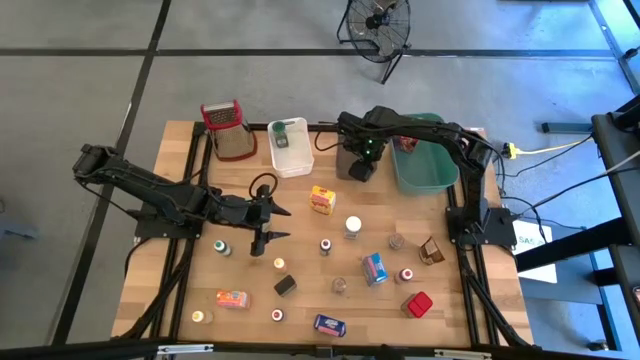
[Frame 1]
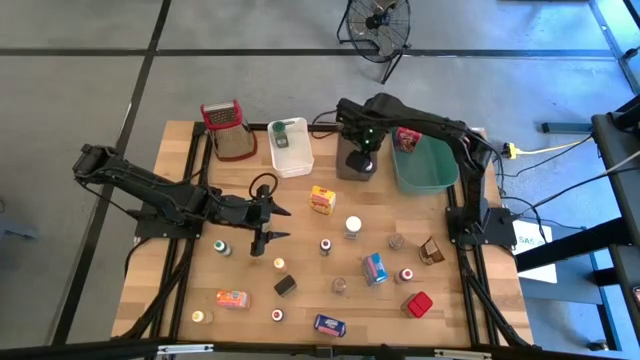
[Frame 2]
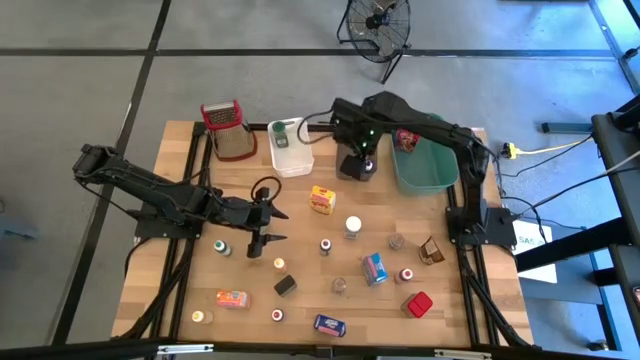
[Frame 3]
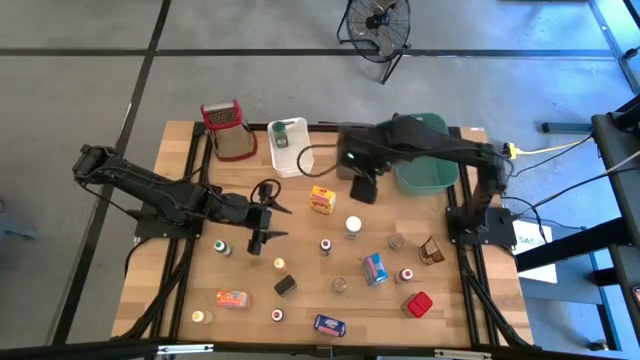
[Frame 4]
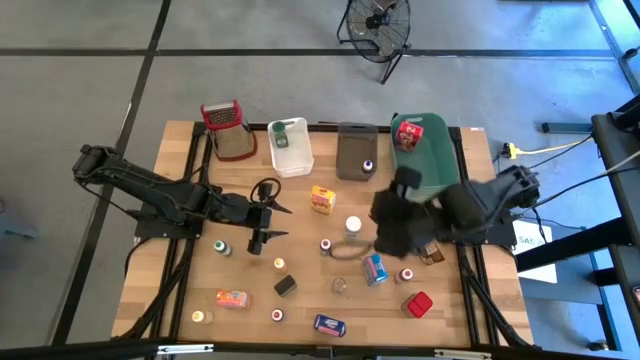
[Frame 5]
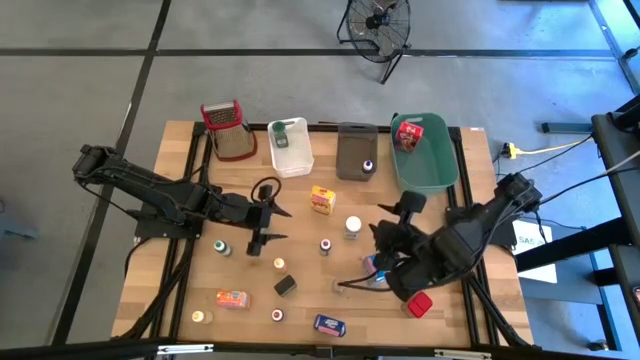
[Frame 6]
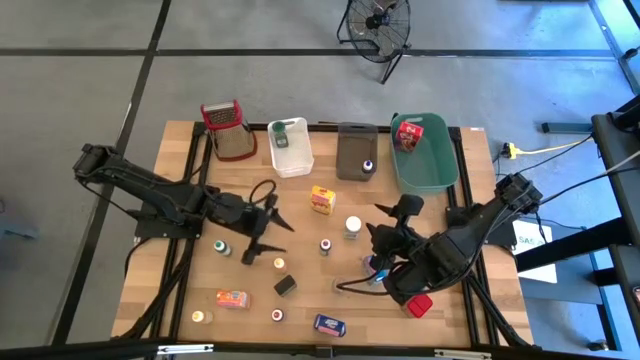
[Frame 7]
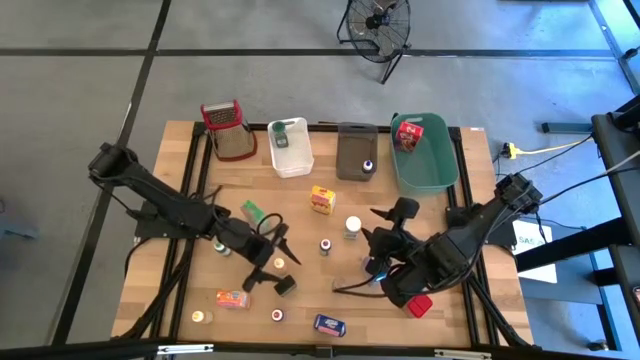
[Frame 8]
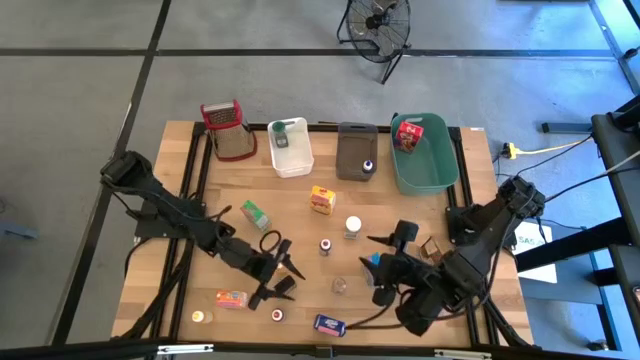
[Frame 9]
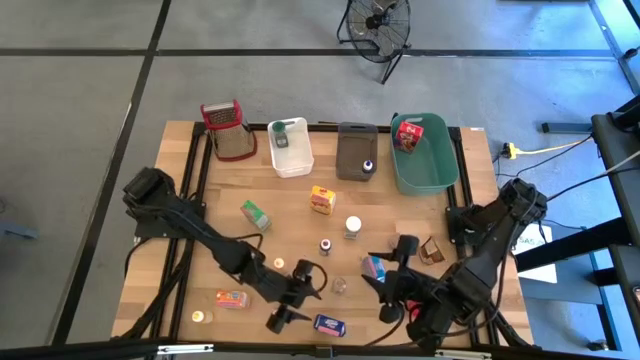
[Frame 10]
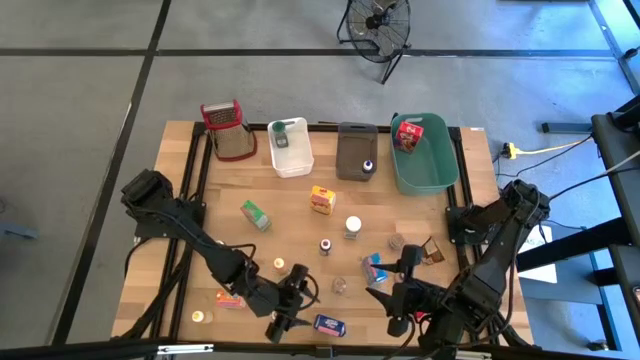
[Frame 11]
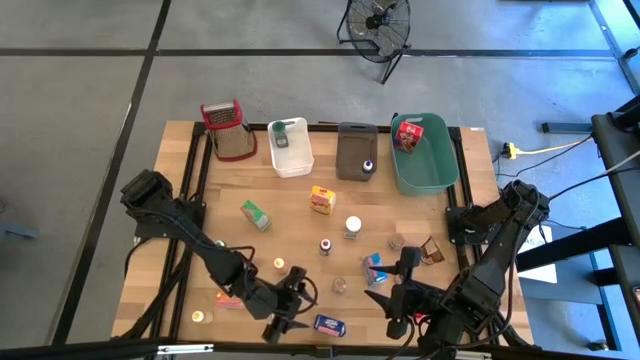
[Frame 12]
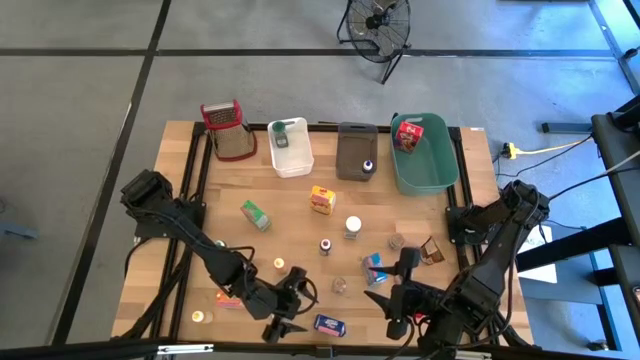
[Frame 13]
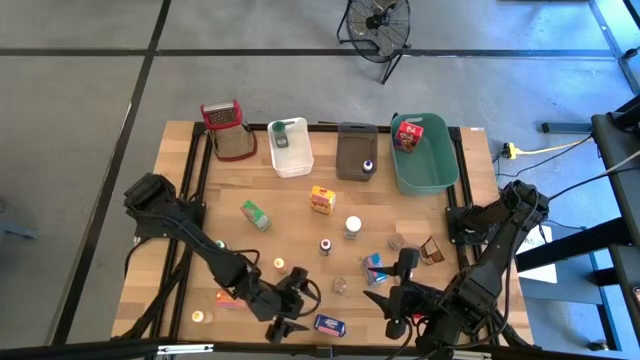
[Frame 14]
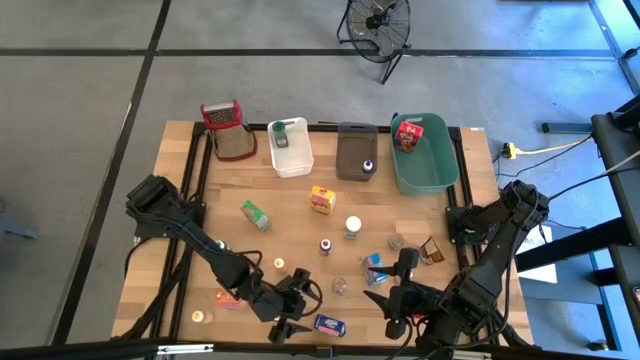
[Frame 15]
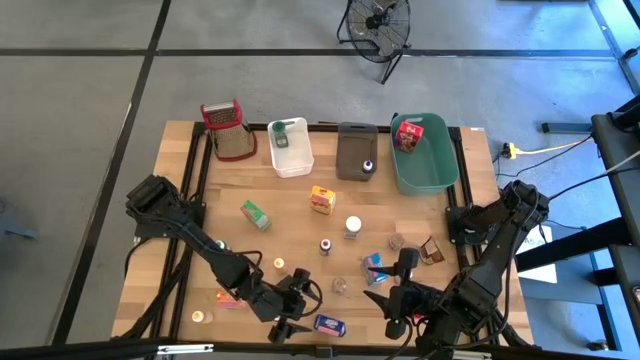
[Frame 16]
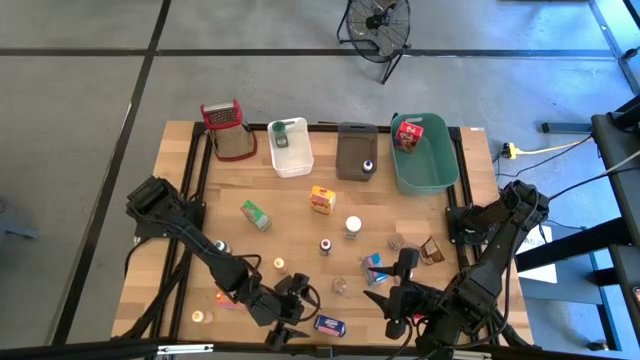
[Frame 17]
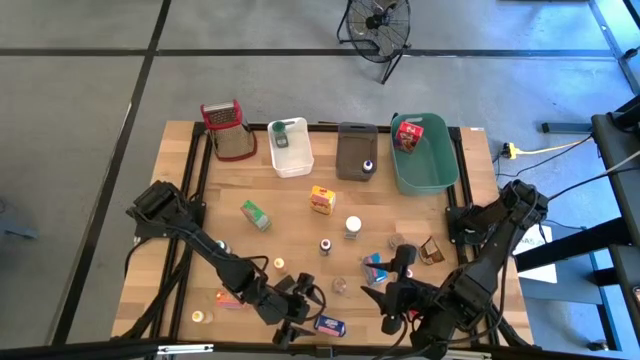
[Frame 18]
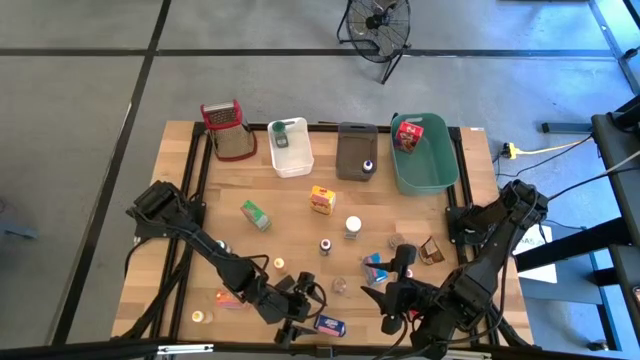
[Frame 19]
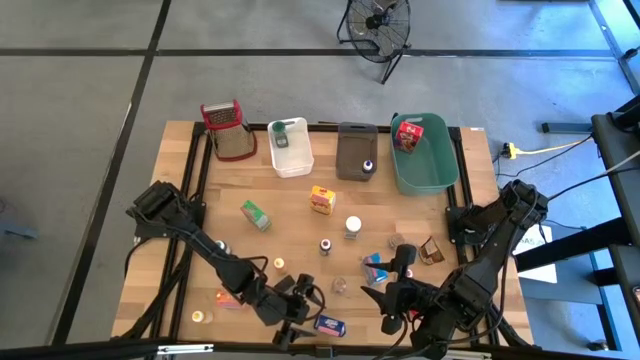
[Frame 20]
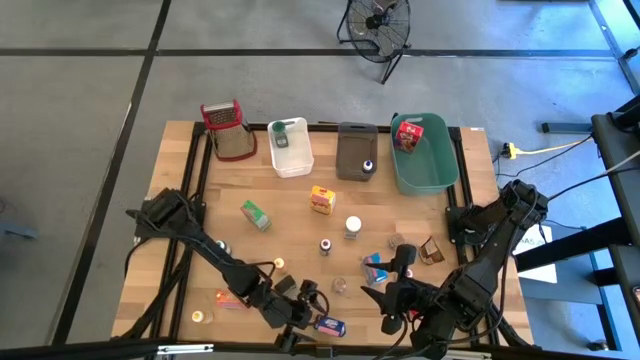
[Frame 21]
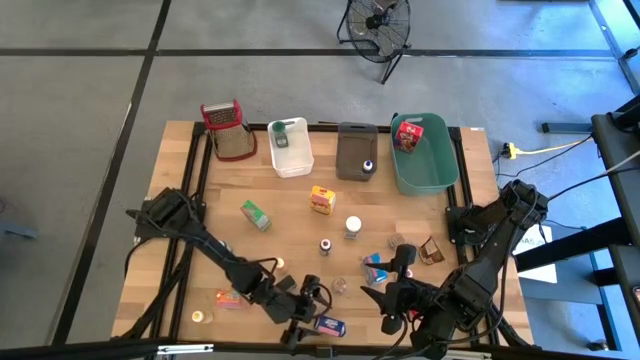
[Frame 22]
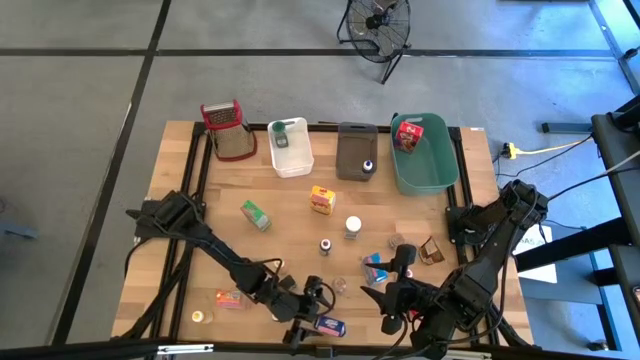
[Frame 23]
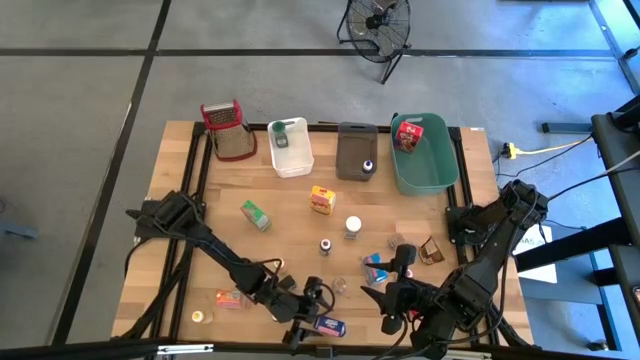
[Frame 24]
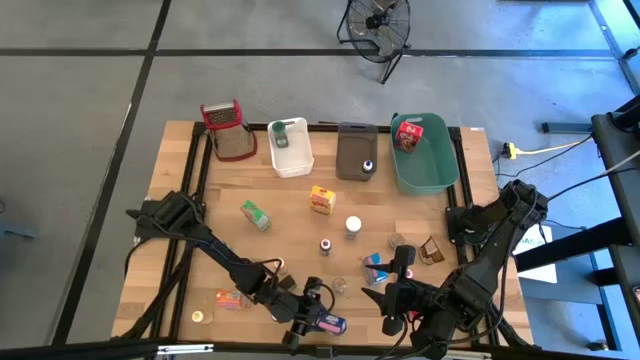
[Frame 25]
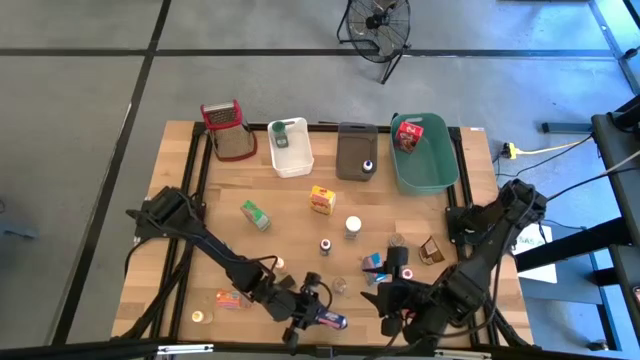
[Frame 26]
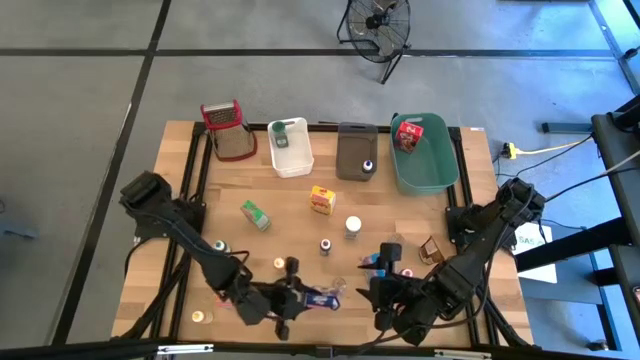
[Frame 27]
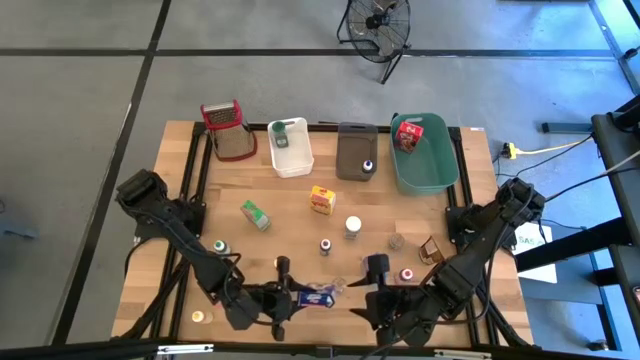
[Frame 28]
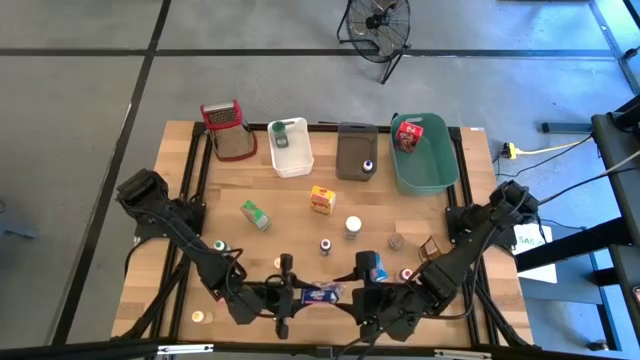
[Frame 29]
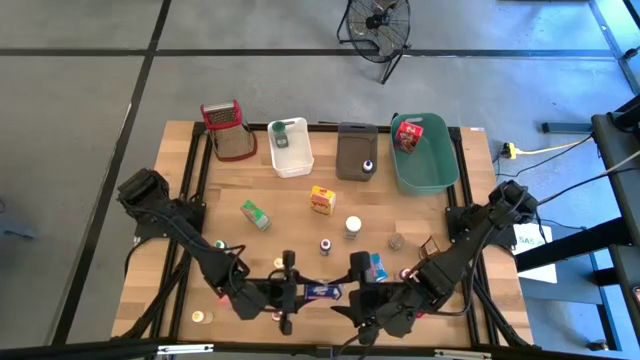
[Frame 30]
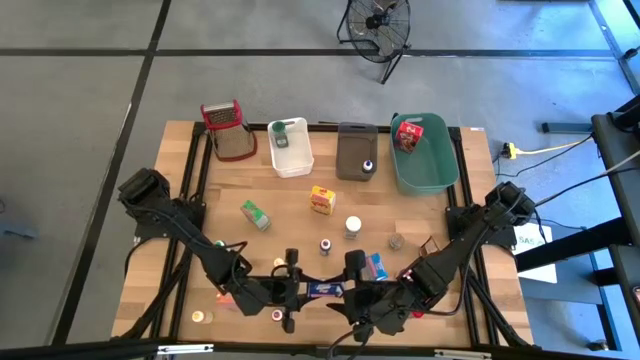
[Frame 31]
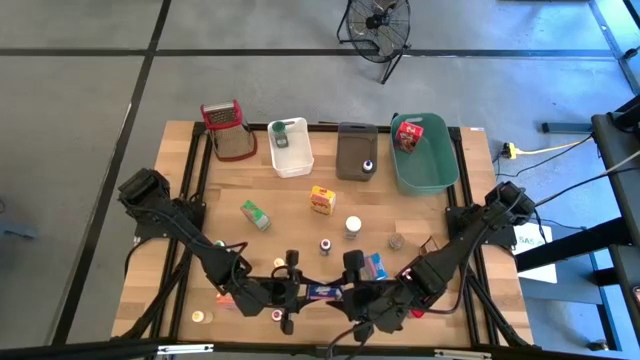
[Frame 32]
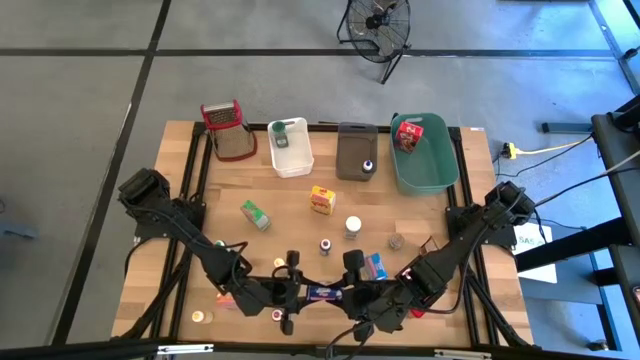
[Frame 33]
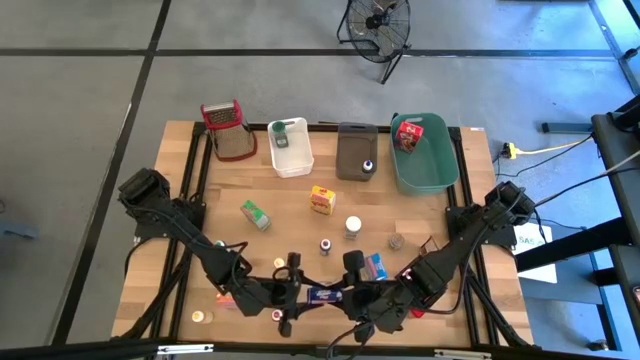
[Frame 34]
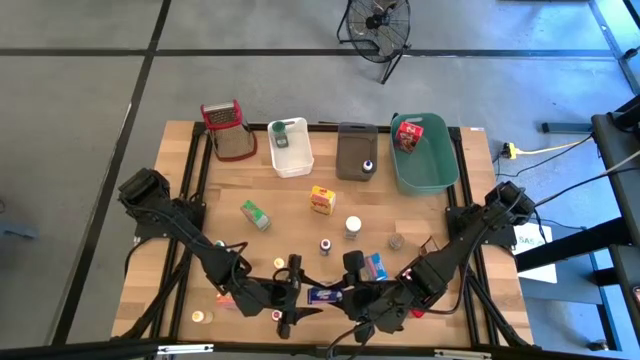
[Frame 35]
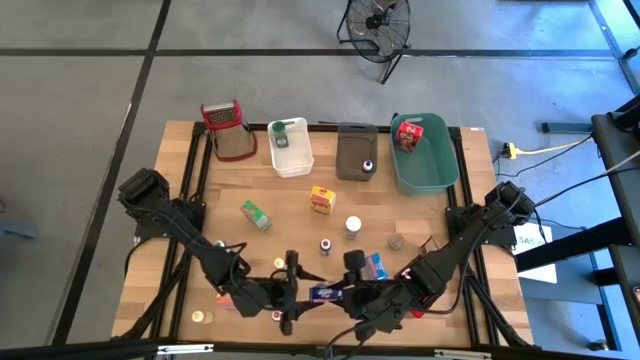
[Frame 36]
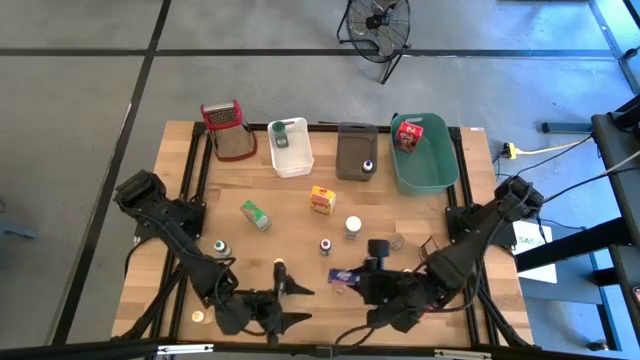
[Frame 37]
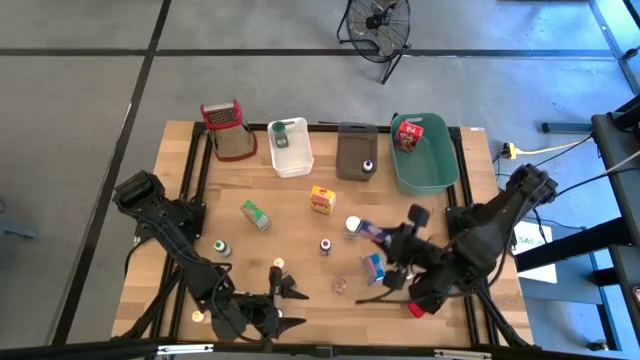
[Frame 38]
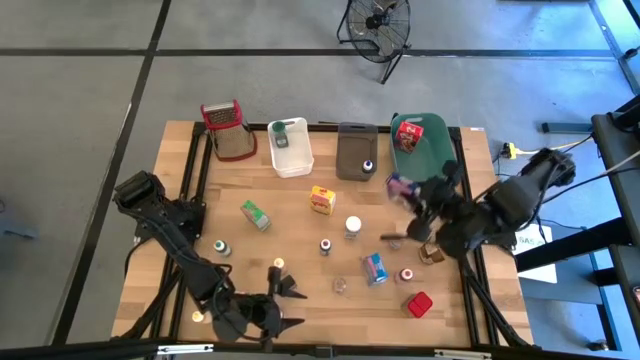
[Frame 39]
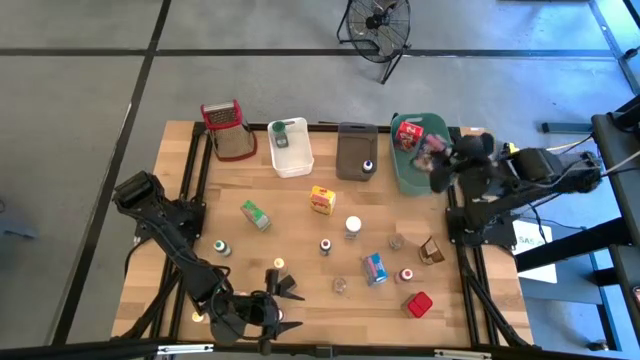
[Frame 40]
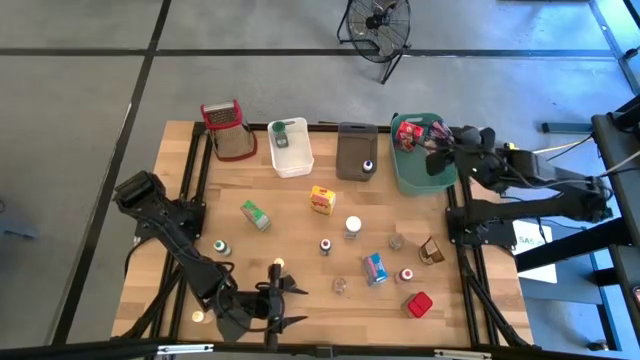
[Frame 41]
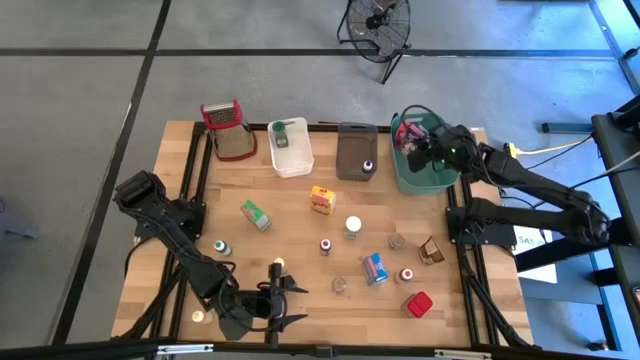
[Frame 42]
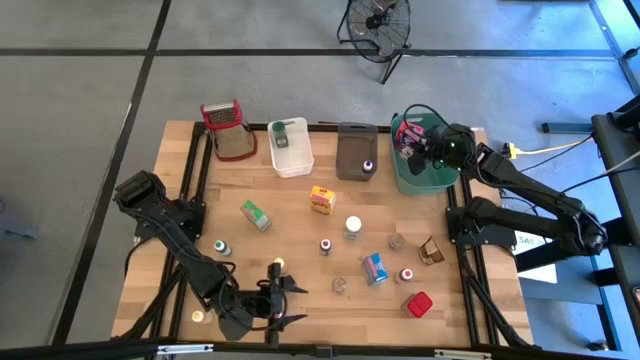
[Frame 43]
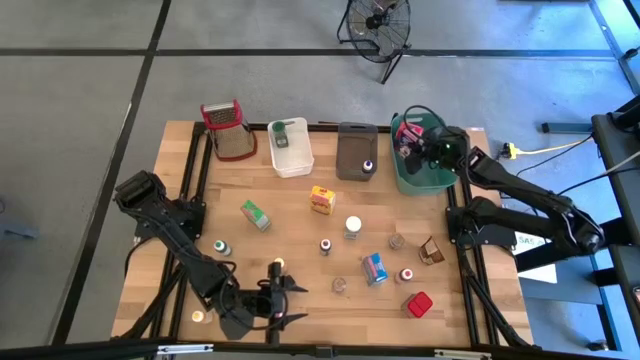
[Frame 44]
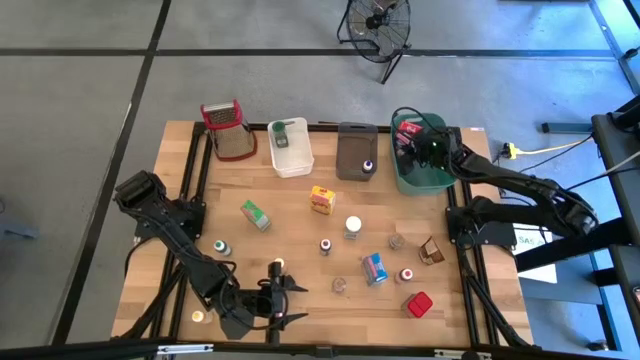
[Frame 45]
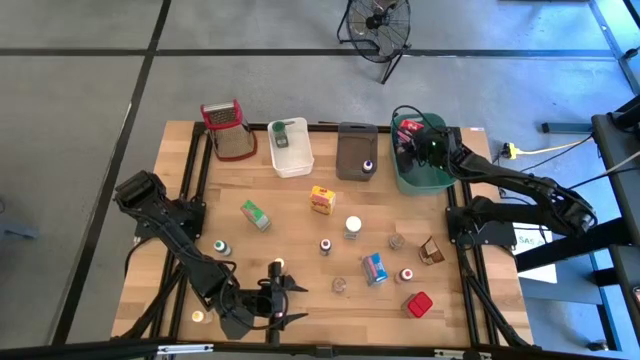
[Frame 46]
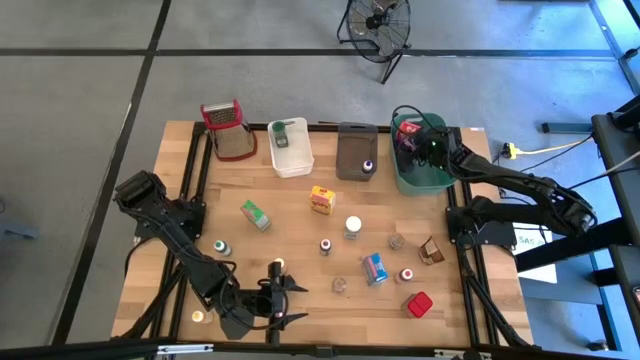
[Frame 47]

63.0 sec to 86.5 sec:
Task: Pick & Place Kitchen Items
Put the blue cereal box into the green bin
